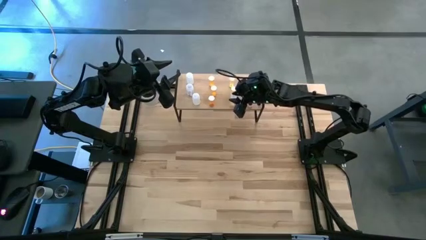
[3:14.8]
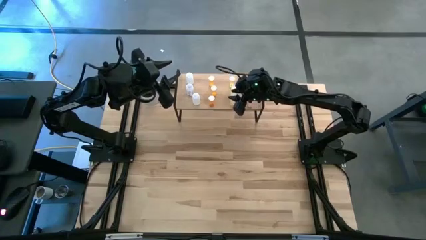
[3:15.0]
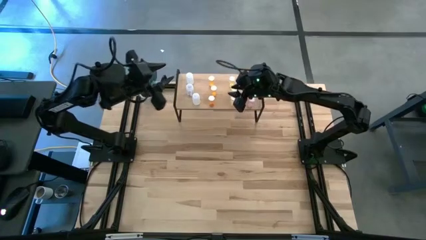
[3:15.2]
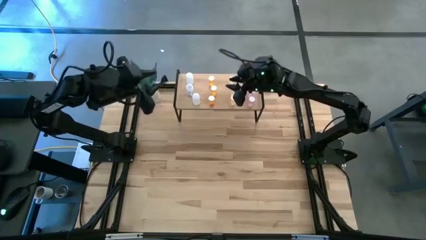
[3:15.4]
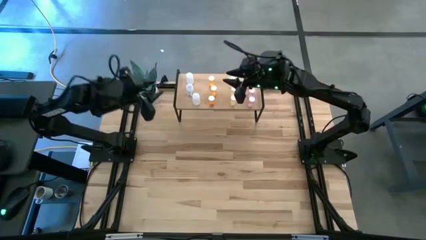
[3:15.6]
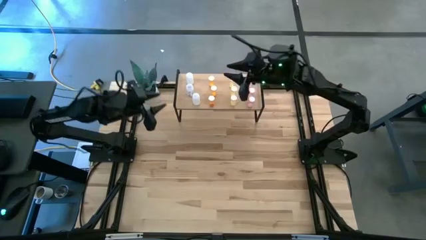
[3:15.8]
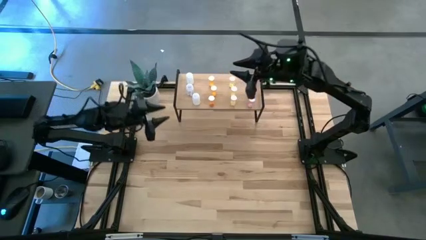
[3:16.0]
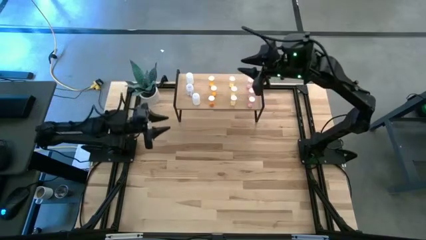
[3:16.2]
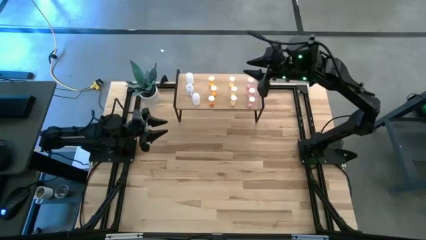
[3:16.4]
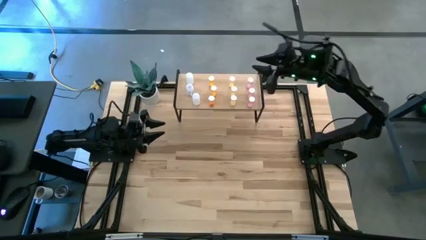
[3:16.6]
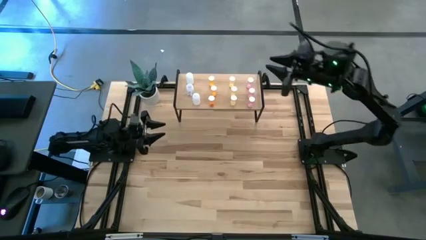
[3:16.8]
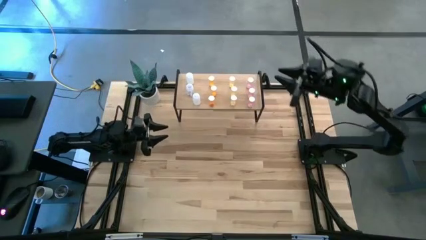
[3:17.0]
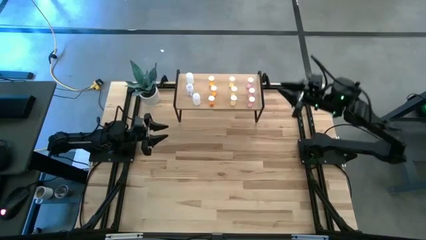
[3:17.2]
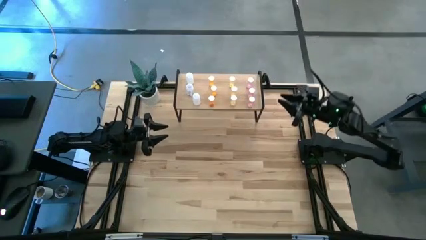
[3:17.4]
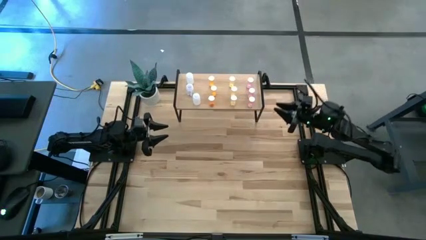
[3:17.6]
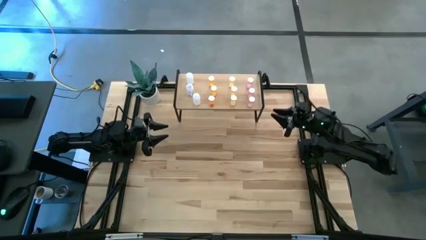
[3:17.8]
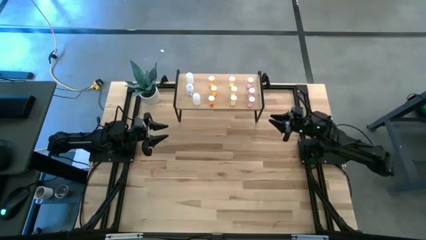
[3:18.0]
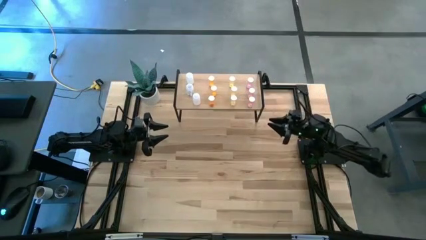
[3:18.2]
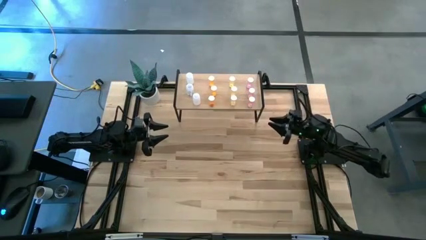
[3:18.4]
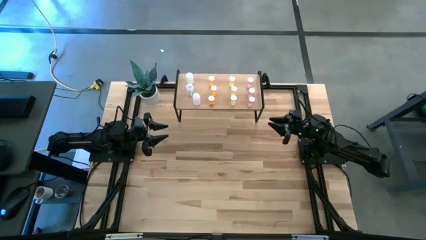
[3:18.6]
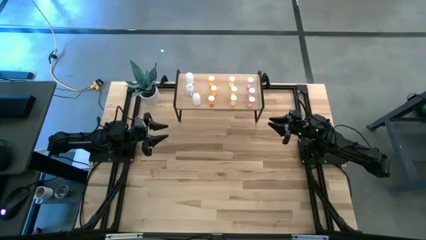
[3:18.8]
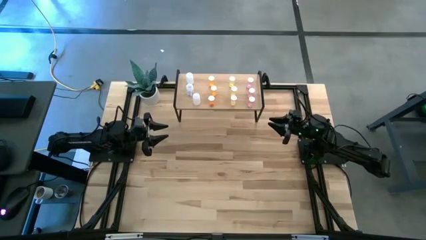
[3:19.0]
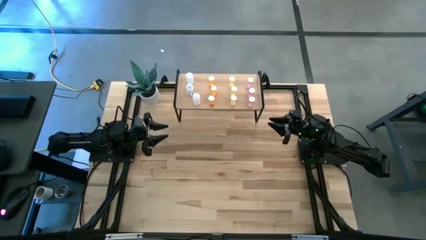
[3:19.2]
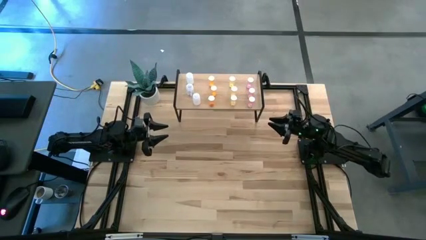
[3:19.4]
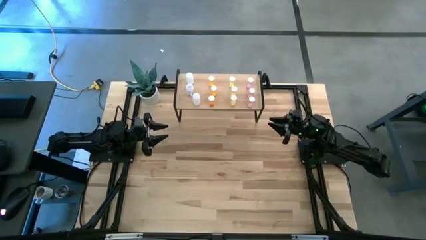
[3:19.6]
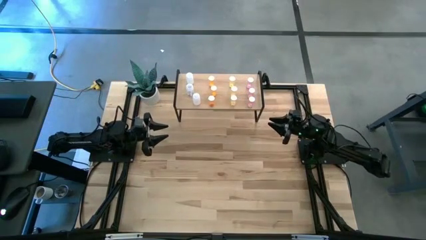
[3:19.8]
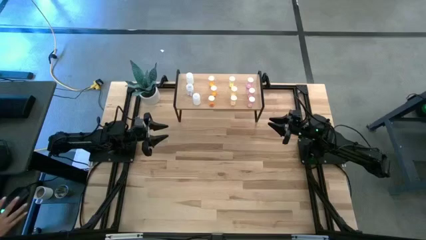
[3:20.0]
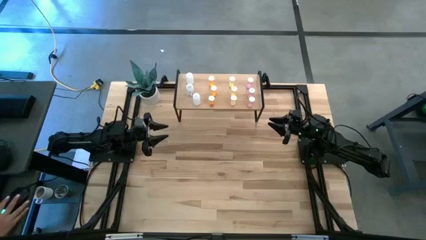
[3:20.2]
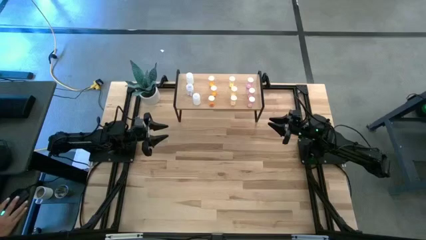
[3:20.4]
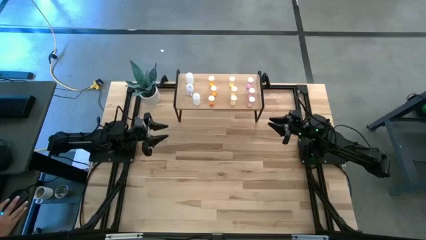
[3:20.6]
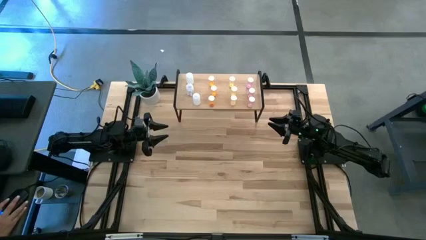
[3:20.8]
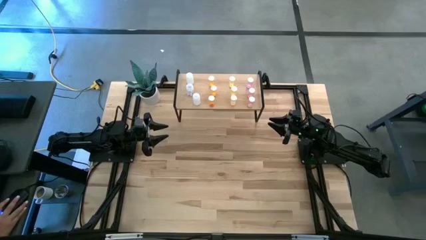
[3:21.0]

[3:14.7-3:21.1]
Task: Pick and place medicine bottles onto shelf by color
Return to Home Position

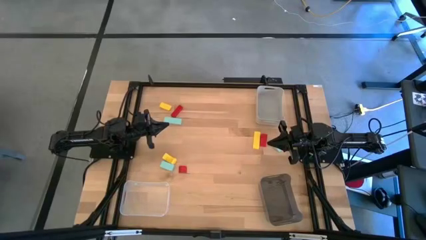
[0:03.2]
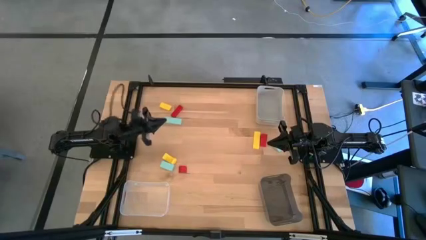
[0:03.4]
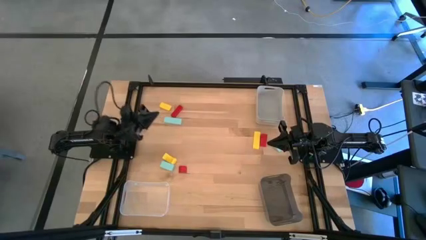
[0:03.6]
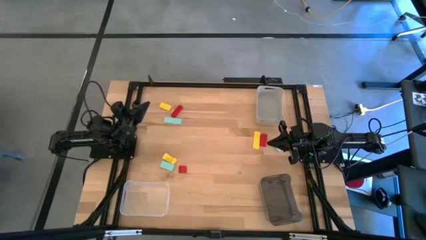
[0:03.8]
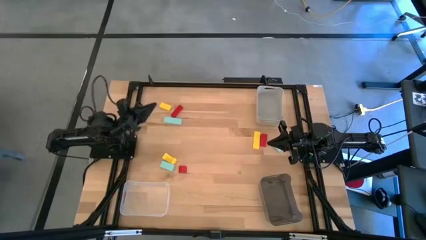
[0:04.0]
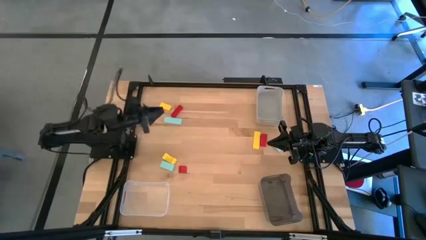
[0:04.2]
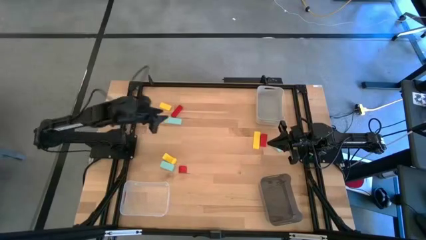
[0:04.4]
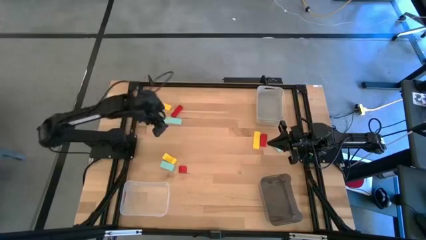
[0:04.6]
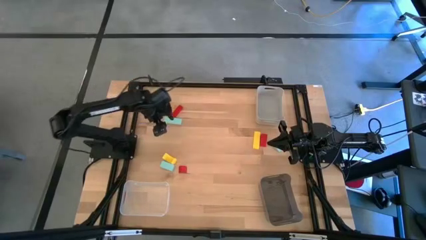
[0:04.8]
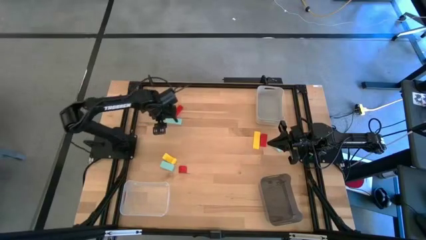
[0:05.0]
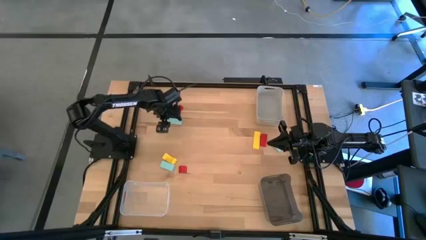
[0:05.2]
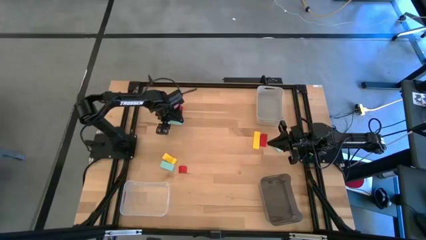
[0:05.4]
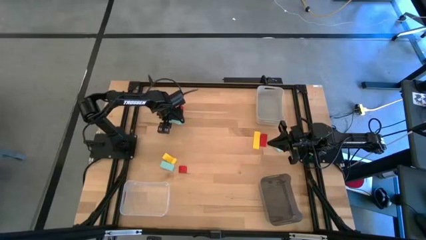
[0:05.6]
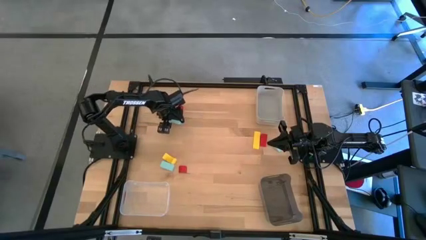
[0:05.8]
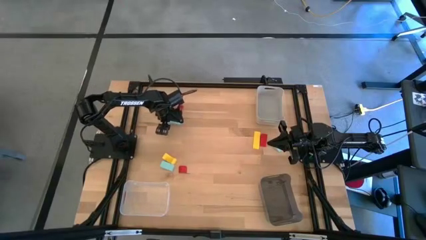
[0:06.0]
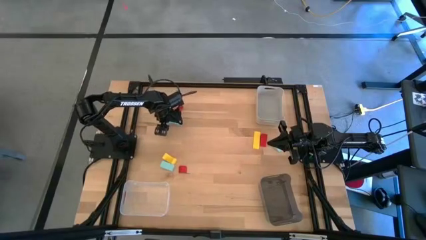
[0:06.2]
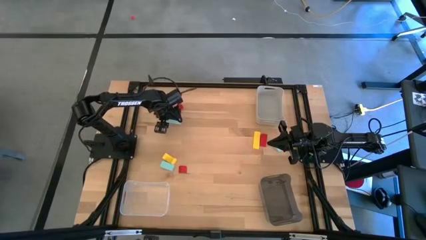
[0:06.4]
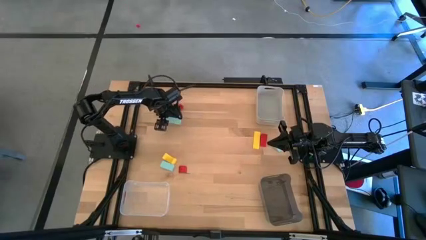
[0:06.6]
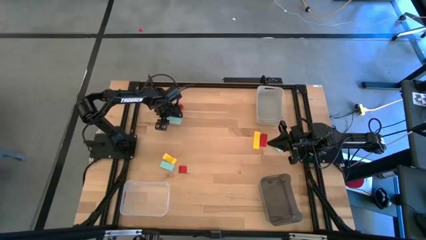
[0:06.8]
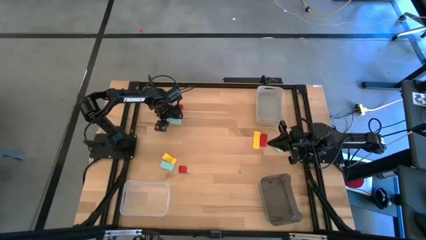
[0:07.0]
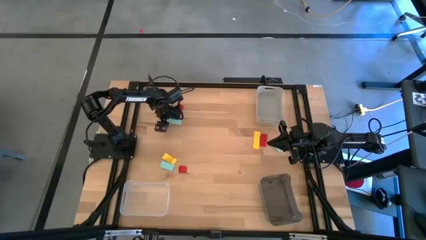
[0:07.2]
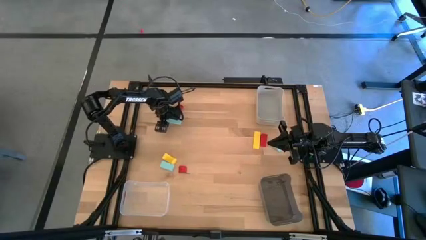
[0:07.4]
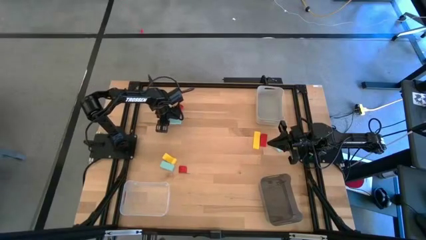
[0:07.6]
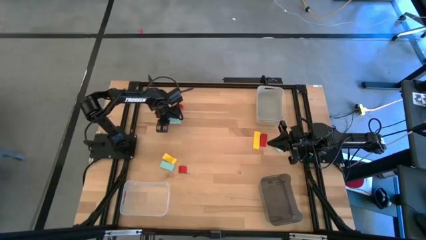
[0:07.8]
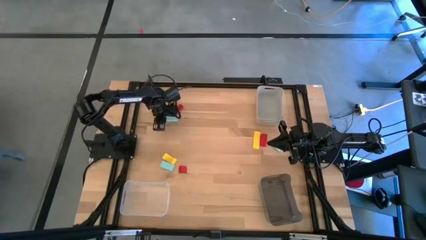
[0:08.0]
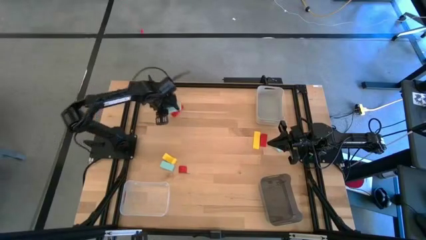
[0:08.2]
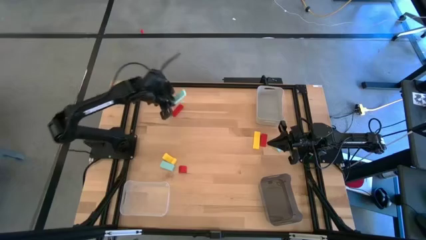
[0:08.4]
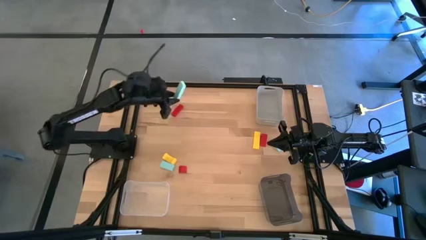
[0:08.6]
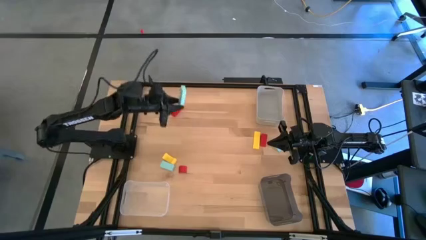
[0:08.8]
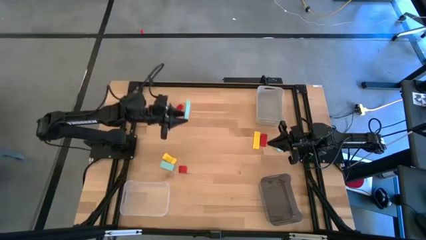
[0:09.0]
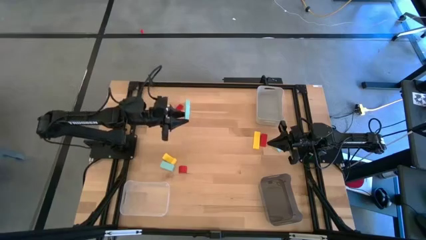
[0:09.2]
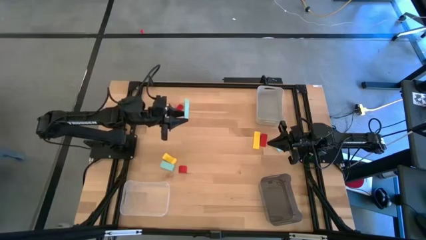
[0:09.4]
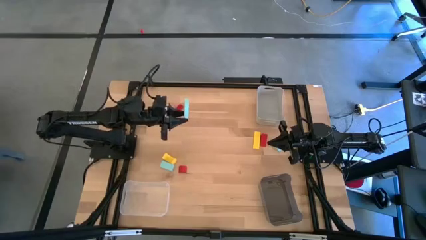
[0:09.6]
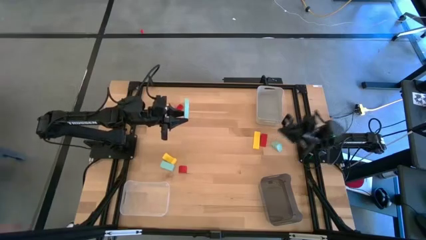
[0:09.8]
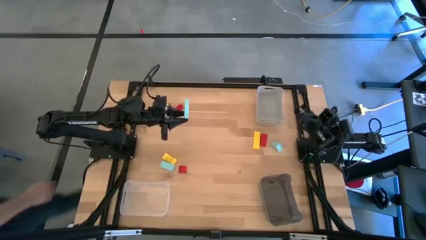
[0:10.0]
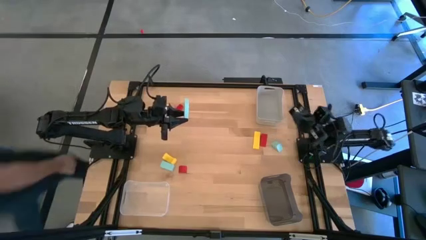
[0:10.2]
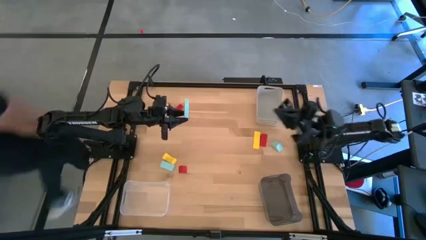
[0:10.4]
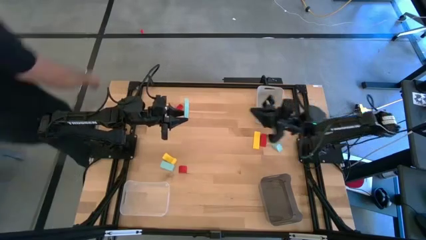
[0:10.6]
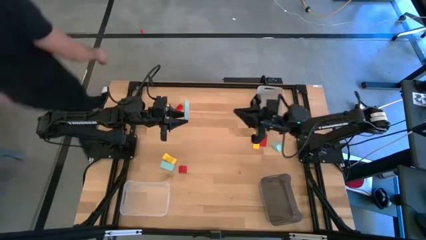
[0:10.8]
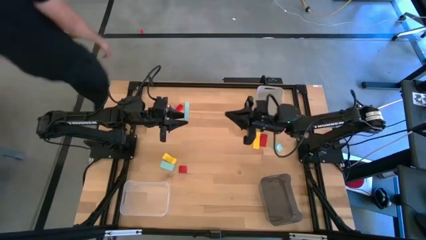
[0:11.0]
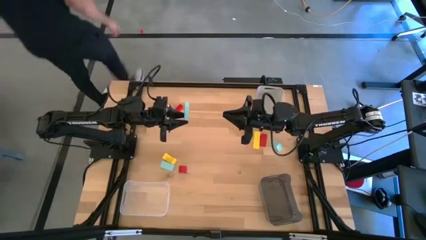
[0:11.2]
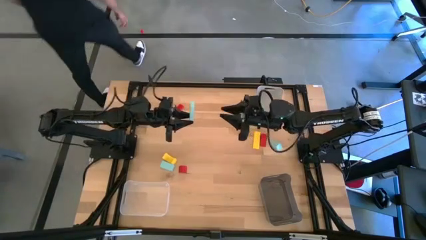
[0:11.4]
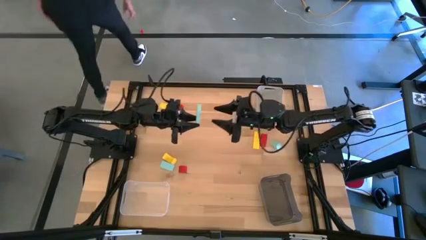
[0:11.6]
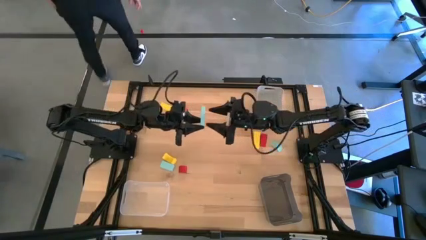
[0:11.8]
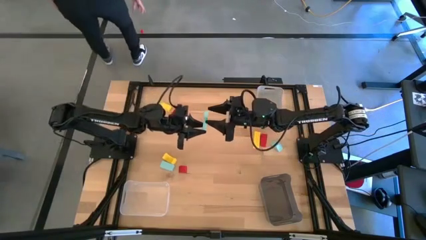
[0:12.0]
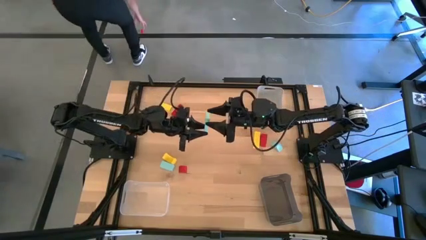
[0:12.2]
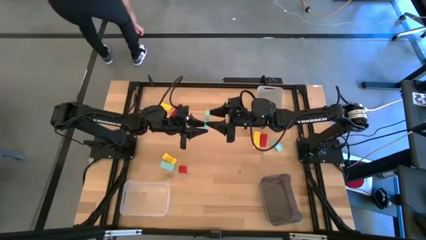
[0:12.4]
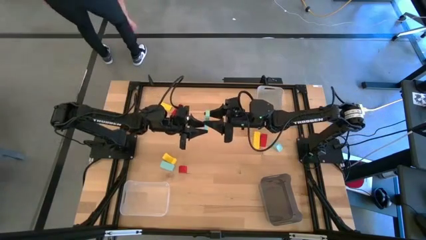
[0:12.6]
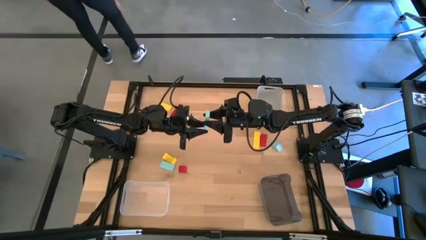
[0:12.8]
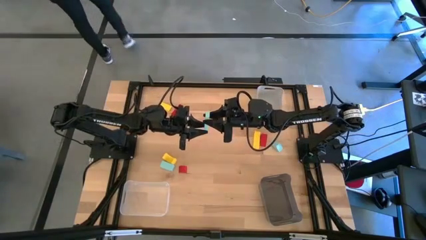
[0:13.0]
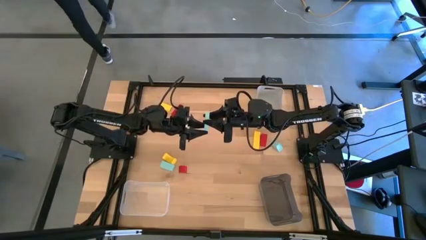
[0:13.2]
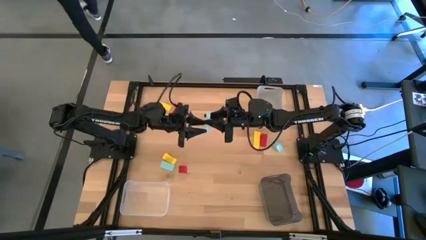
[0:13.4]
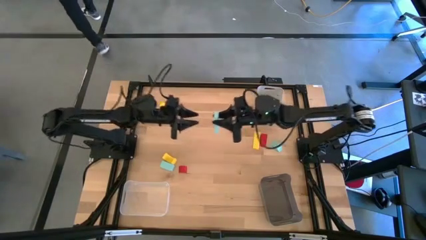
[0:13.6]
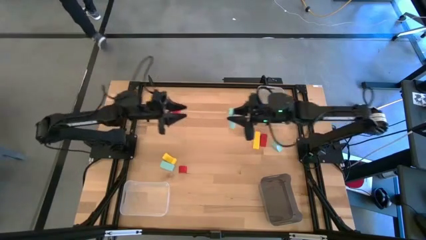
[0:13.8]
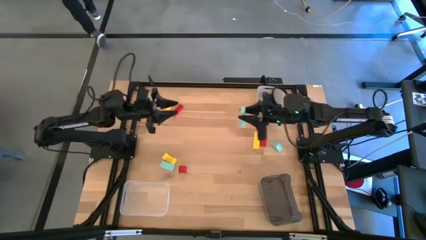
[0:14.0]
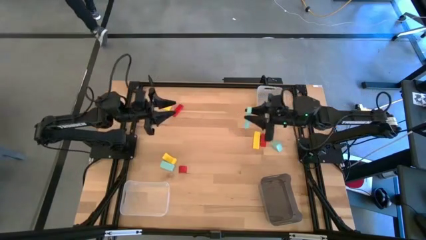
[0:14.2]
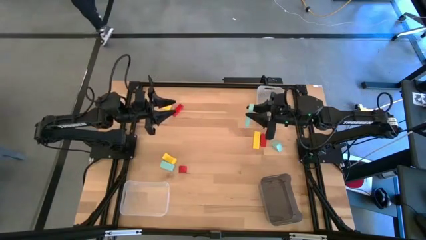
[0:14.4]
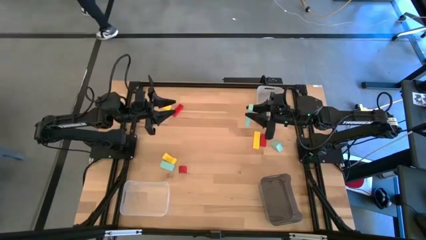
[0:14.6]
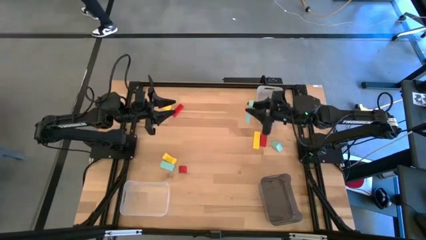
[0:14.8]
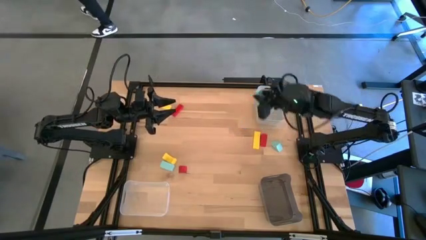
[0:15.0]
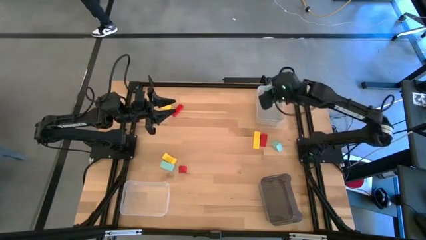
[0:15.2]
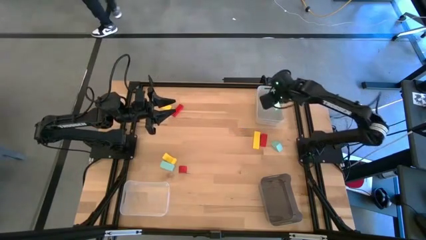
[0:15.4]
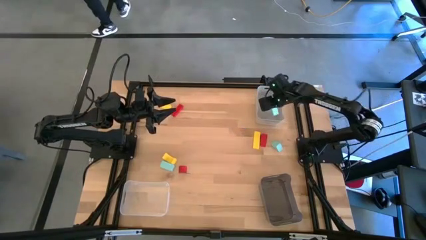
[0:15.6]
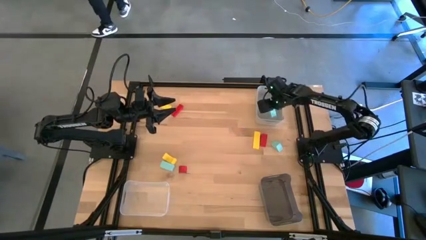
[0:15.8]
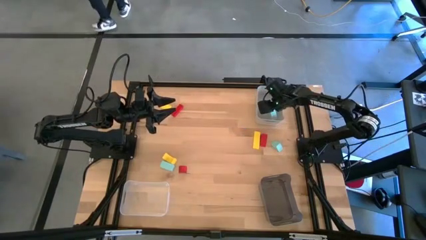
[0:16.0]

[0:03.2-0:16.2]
Task: Sort & place blocks by color
Put the top left blue block into the gray bin
